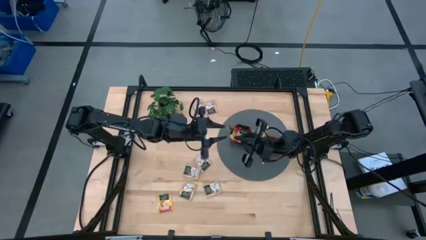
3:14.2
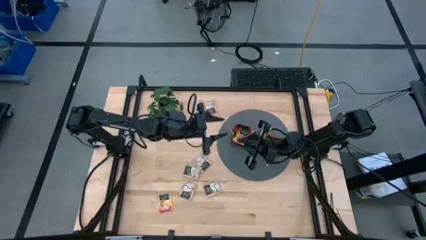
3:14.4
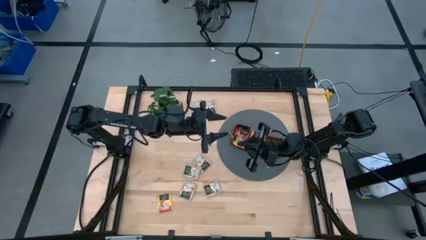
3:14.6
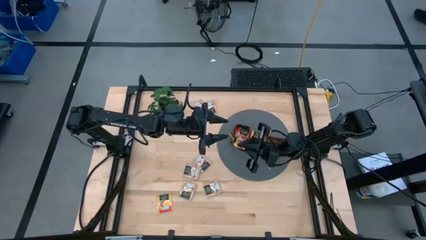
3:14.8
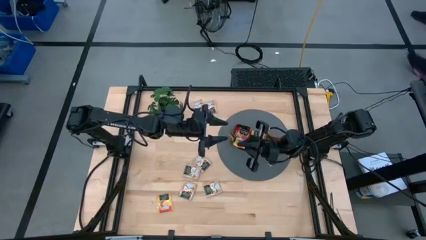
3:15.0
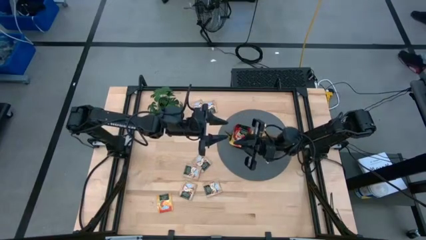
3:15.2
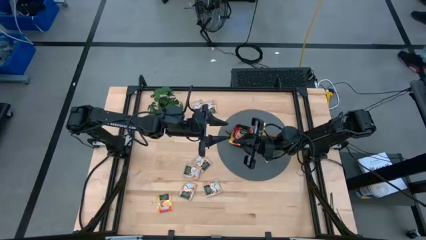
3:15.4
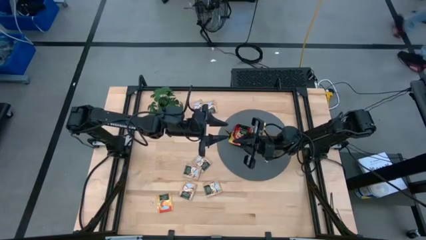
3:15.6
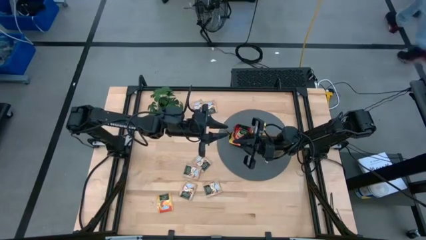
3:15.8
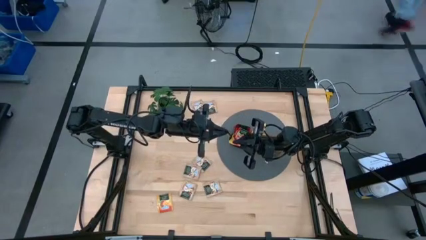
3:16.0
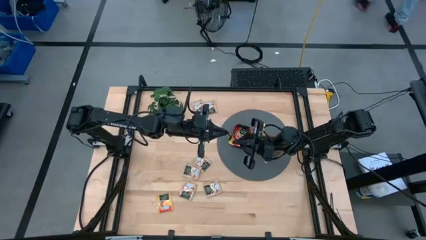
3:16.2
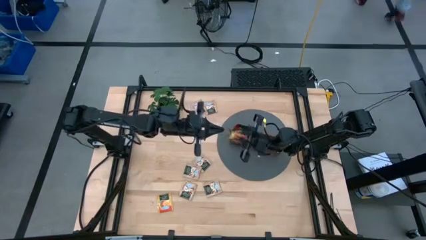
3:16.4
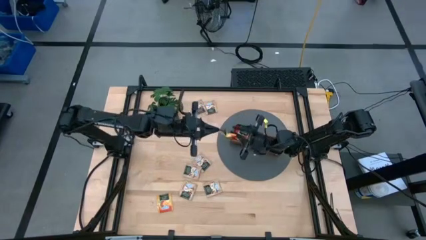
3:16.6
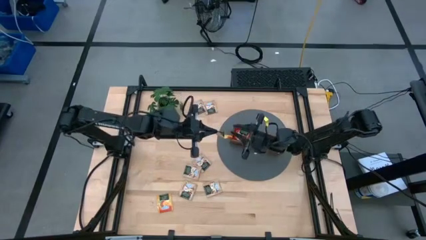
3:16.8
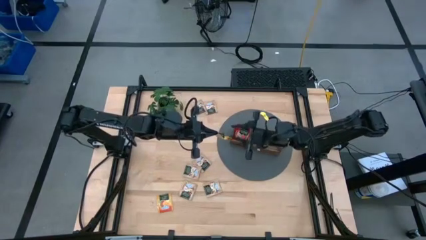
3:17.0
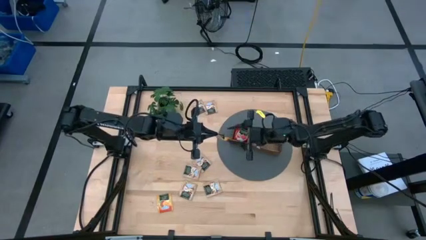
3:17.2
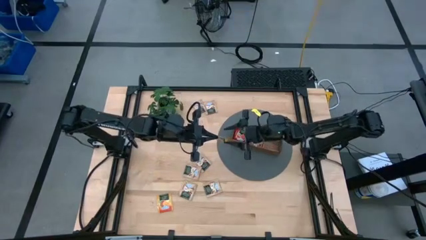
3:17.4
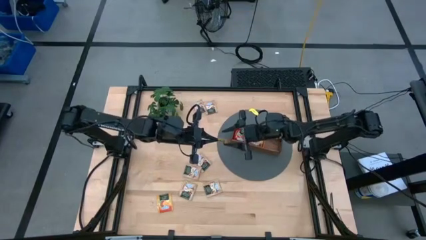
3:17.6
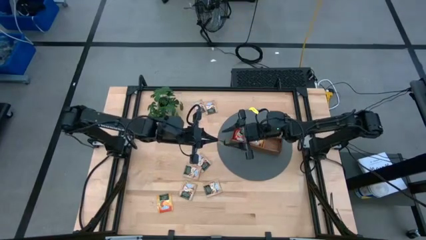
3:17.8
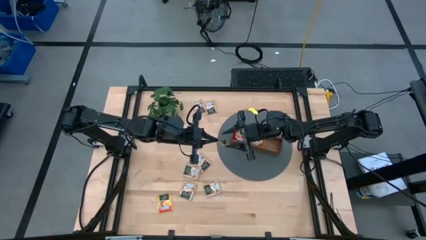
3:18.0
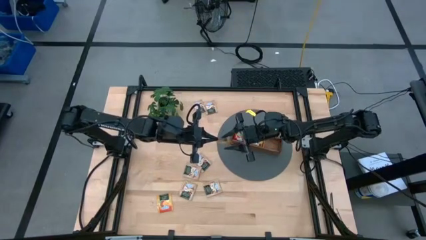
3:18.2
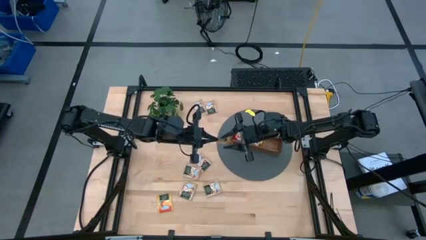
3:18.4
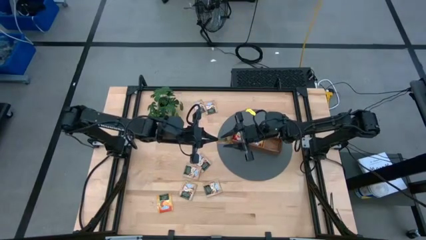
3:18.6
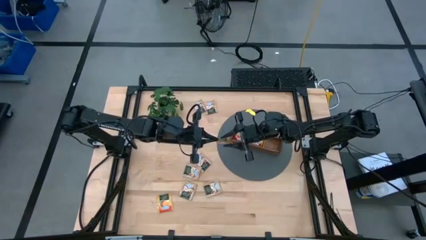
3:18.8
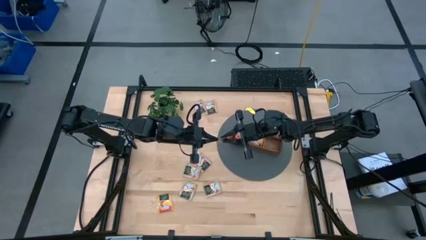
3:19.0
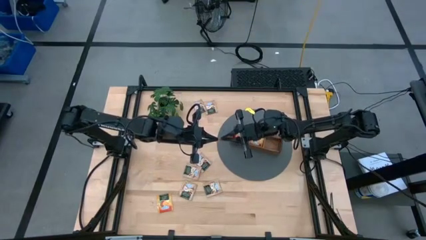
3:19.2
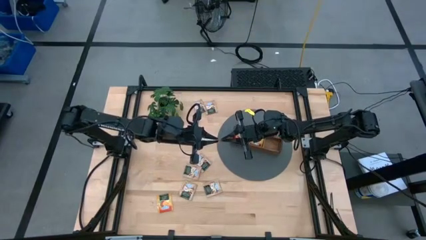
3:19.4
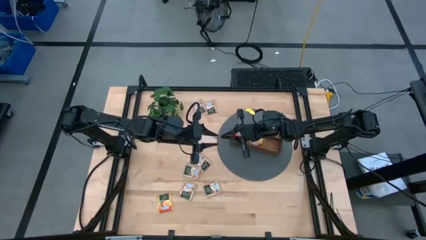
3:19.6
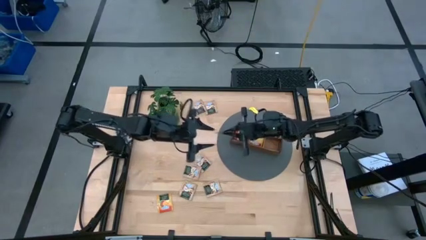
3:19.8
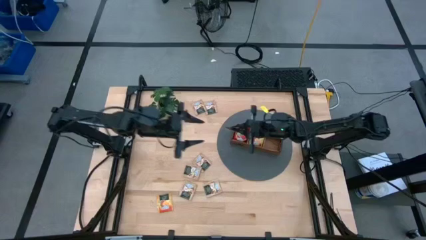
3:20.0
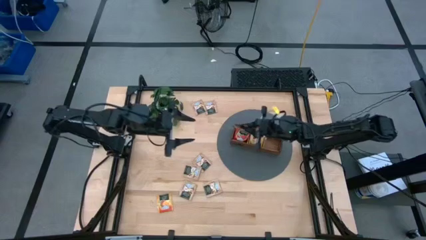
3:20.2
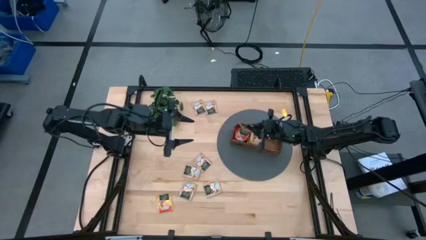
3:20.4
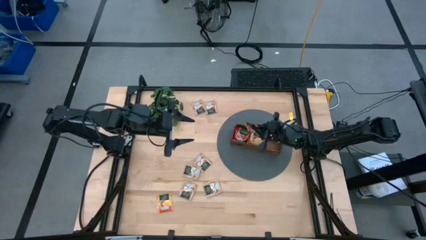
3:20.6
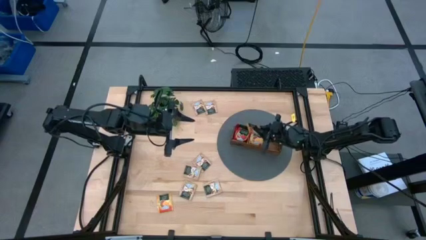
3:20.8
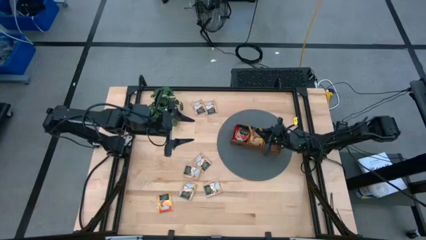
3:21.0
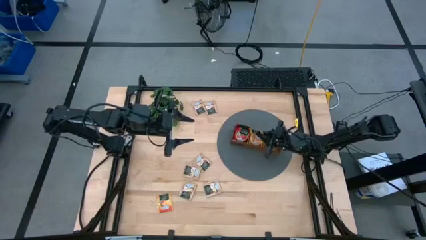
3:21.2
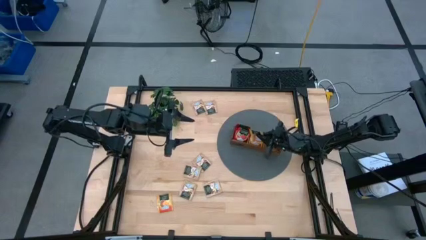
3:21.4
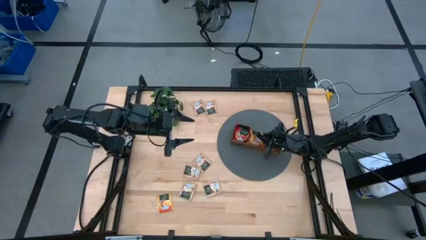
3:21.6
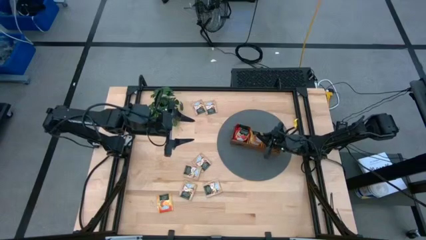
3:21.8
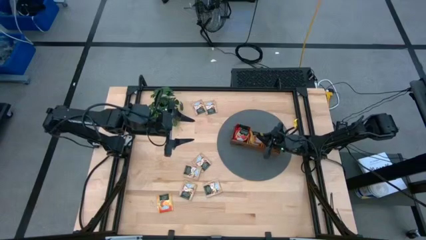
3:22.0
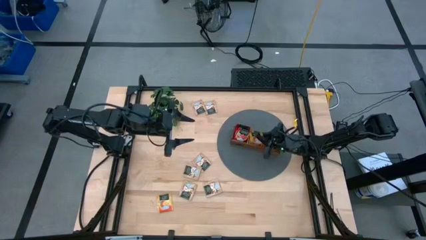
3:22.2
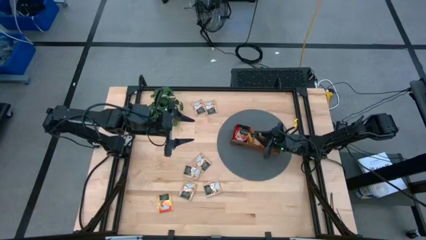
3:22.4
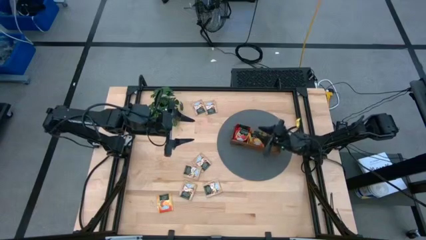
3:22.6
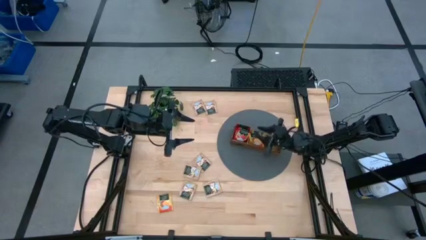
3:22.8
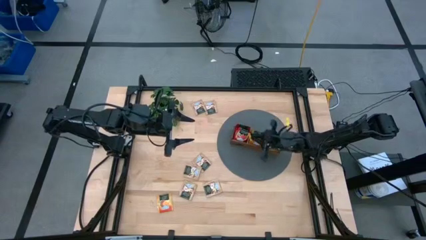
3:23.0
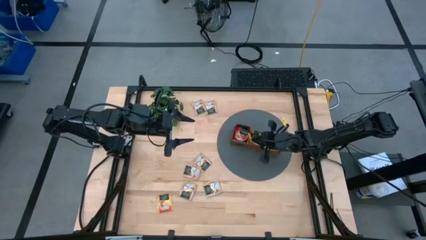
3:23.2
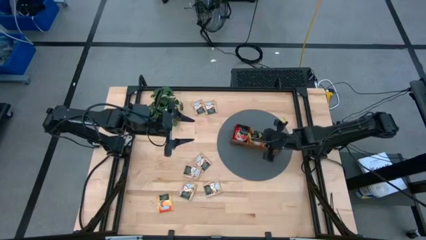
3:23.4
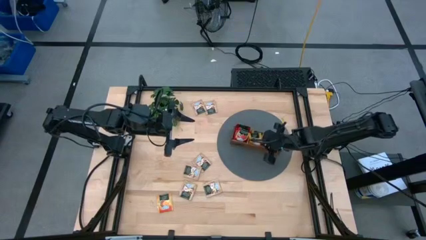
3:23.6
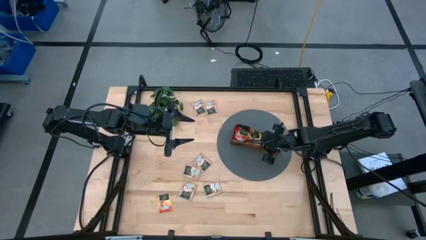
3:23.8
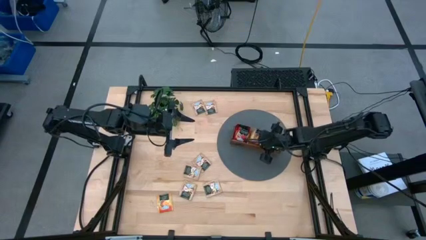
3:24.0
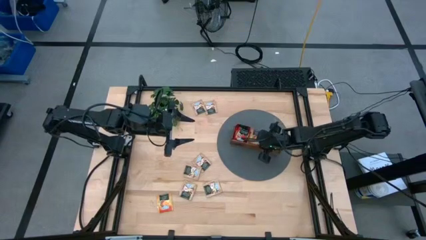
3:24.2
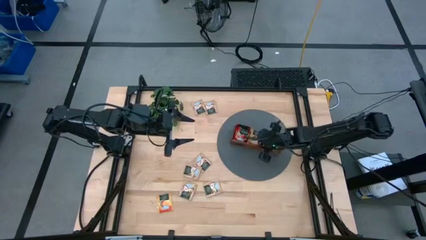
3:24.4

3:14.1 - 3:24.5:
Task: Pick & Place Tea
Put the yellow tea bag into the middle section of the wooden organizer

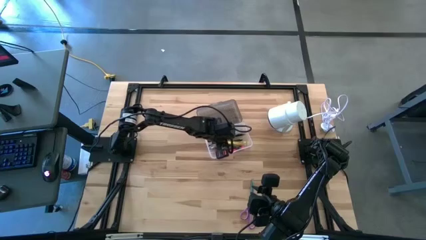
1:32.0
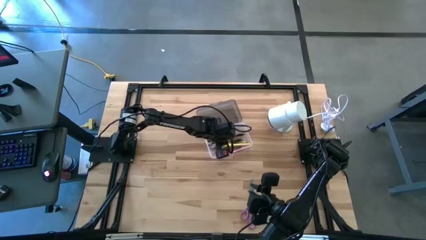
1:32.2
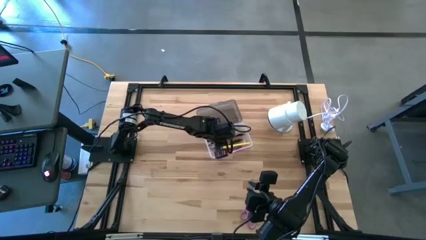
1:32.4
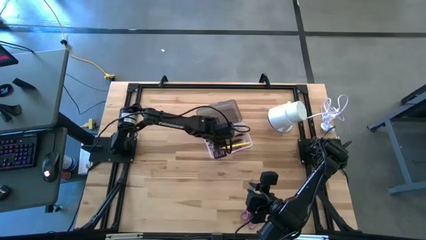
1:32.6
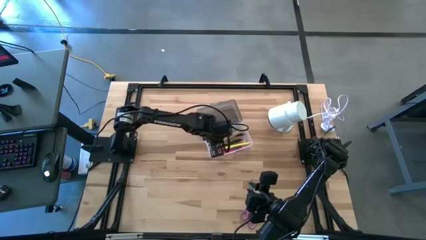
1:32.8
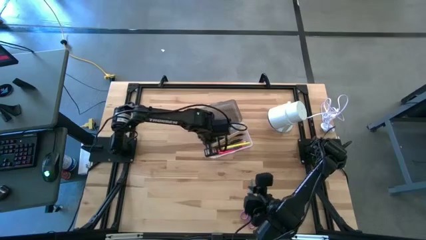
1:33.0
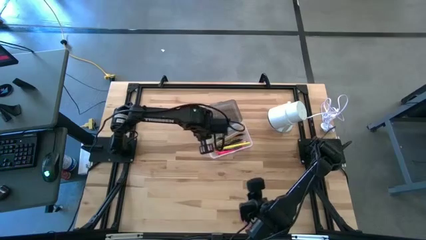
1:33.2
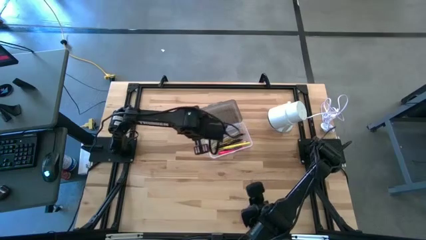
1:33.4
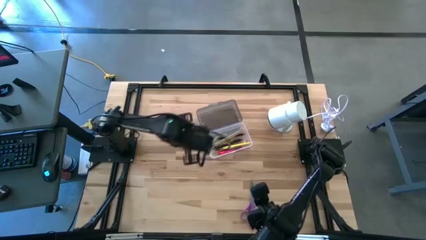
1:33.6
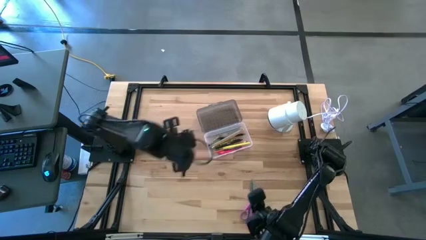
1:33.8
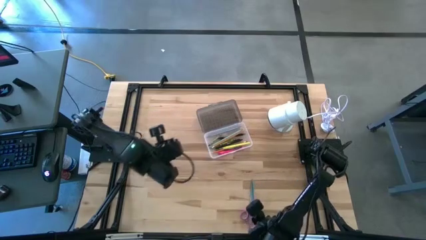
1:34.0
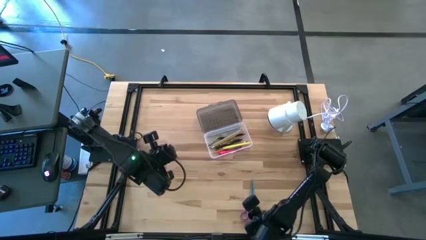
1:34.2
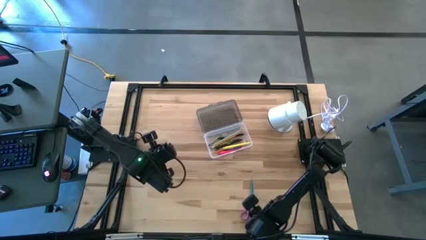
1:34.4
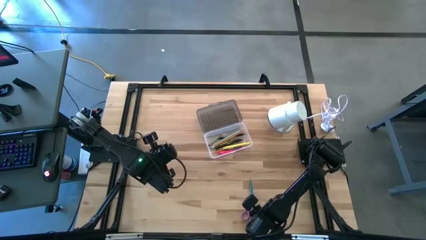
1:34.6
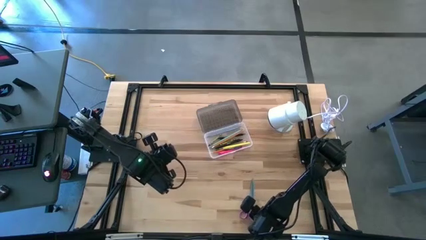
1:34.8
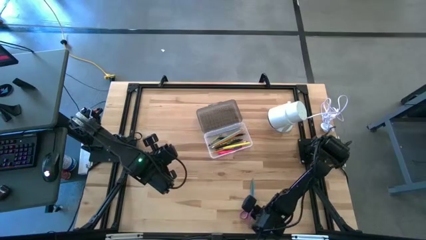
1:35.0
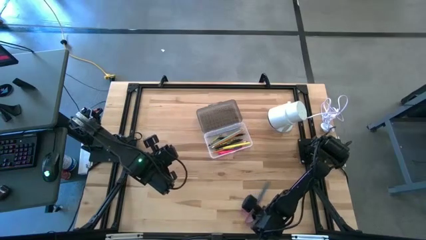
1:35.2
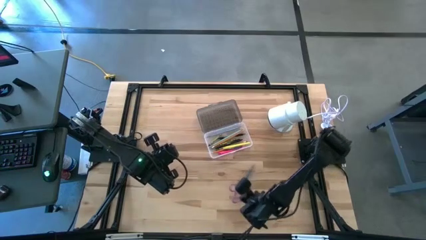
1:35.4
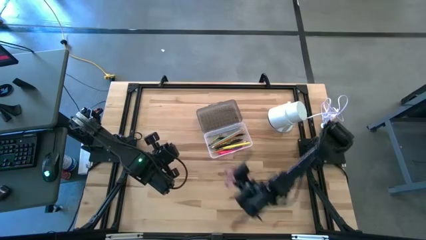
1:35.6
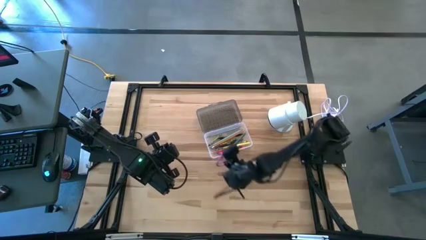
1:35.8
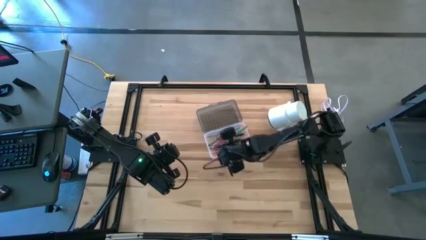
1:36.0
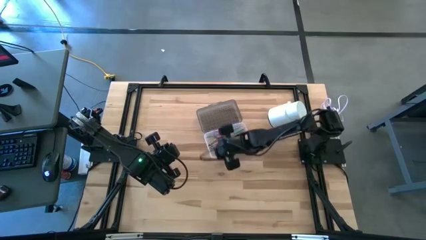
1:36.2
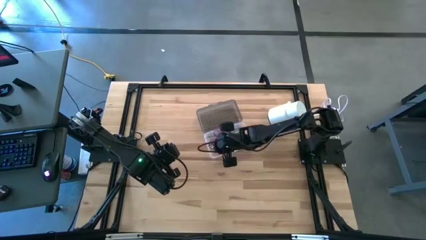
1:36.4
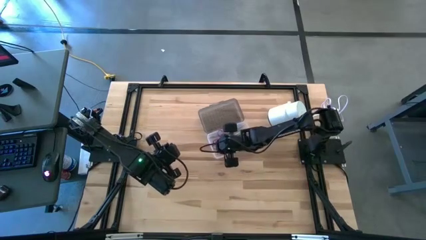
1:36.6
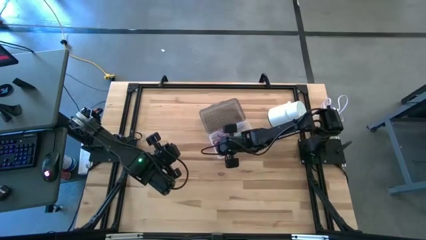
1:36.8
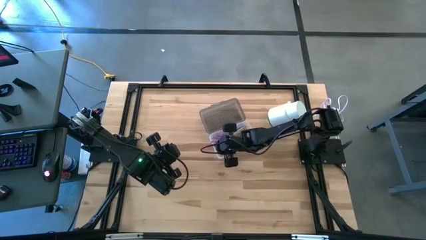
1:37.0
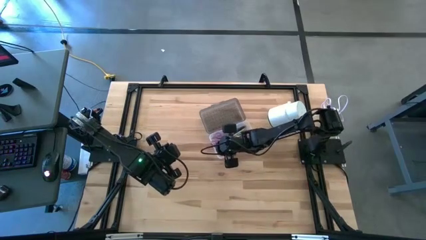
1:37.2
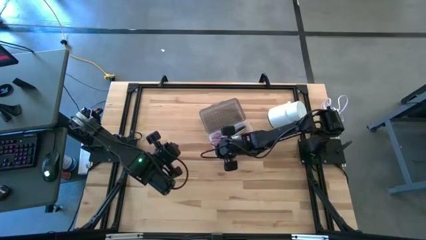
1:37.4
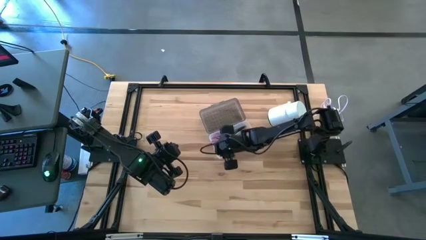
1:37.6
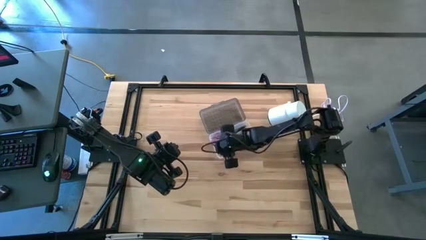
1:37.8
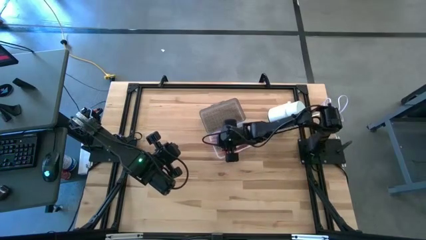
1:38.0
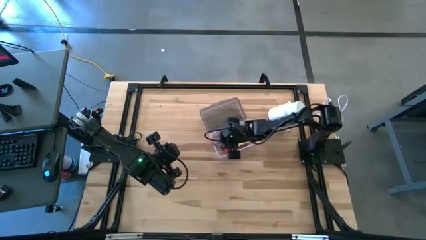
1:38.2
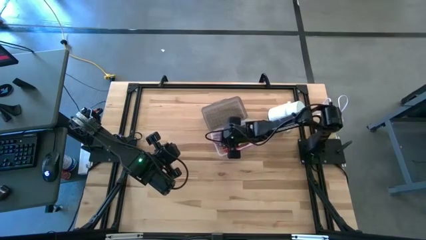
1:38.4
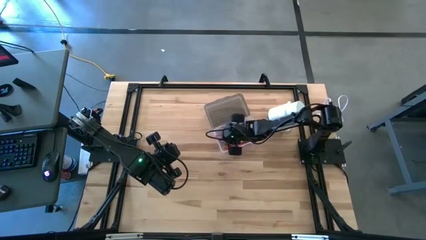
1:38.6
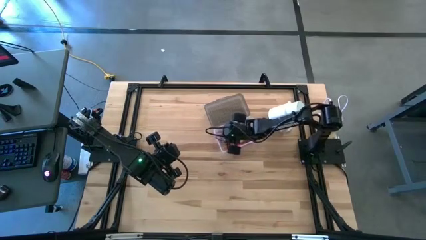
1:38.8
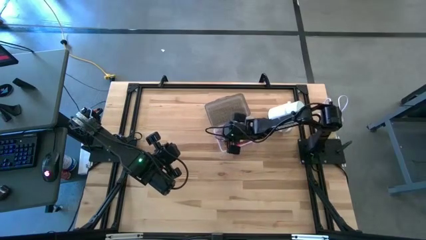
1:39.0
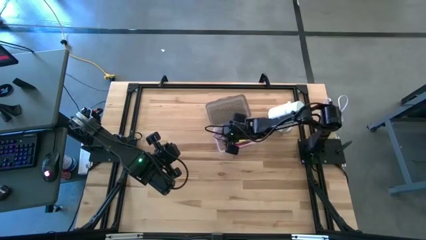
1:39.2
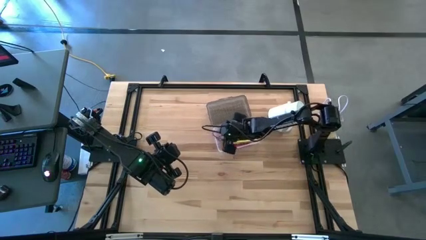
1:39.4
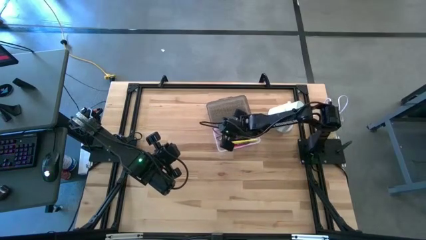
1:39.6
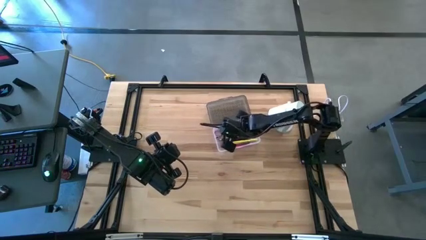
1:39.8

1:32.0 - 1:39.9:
Task: Pick & place school supplies into a supply box
Put the violet scissors into the gray supply box
